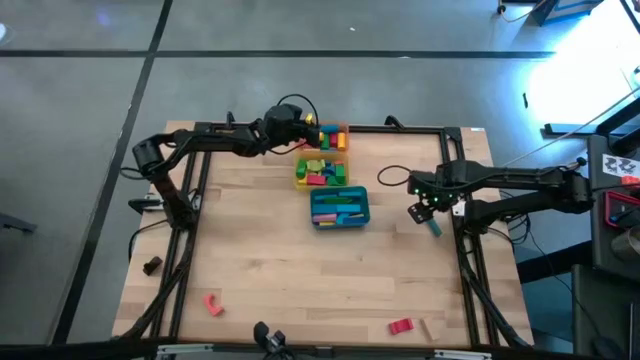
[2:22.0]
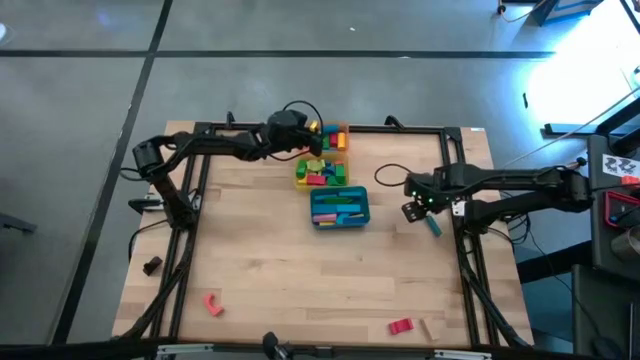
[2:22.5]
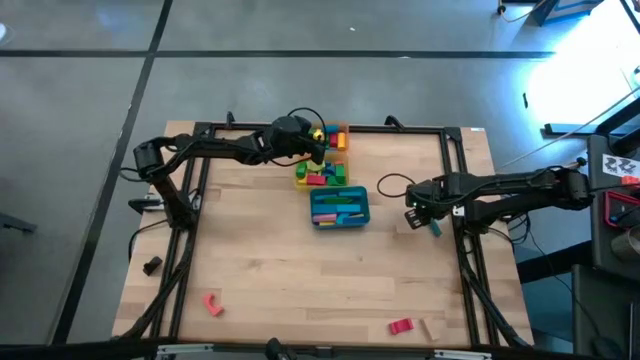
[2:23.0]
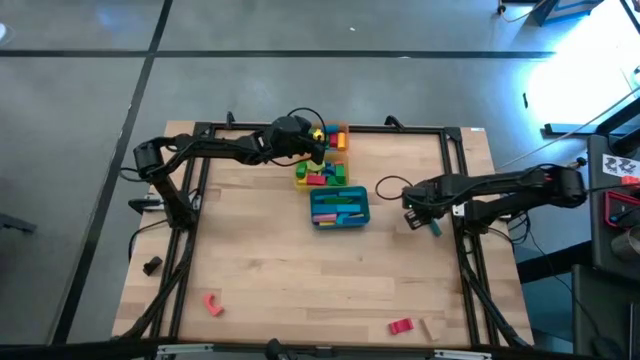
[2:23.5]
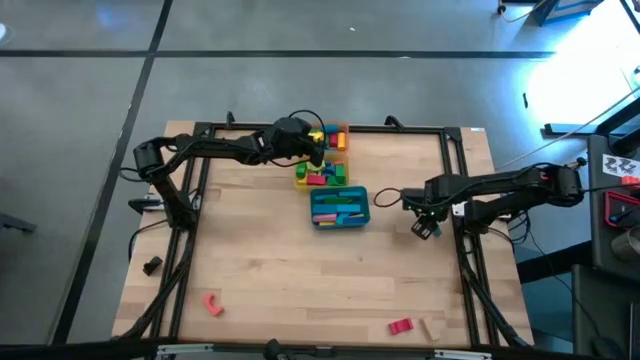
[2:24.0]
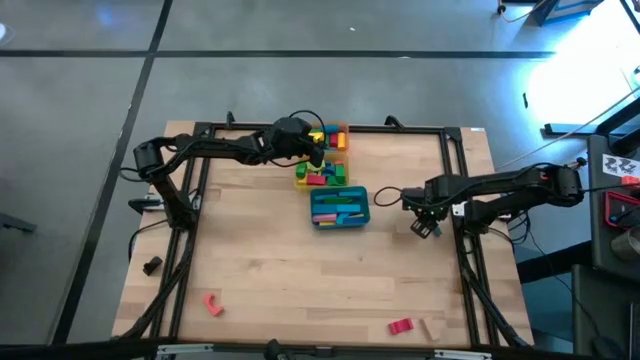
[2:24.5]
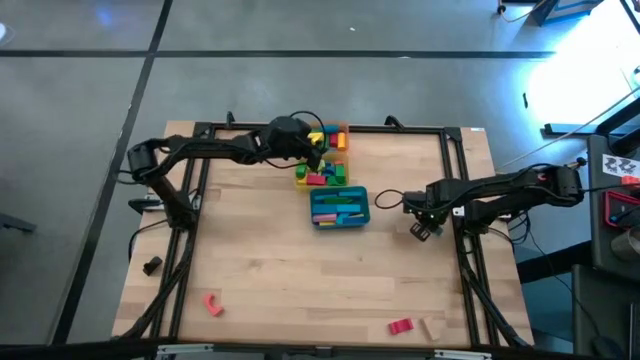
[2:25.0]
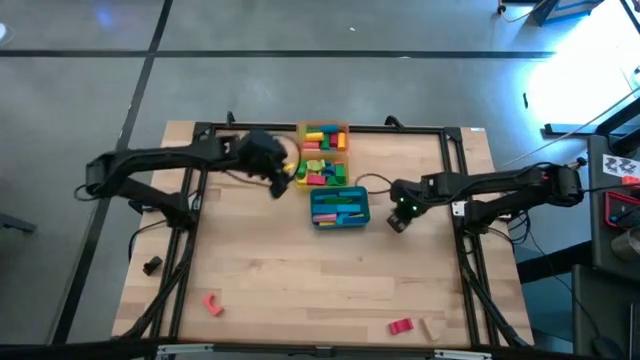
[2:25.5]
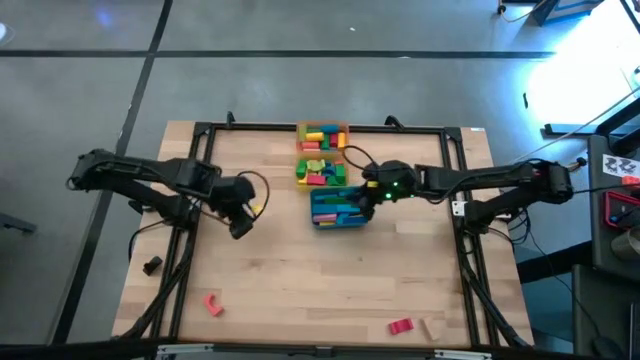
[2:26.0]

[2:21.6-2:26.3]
Task: Sort blocks by size
Put the blue rectangular block into the blue bin

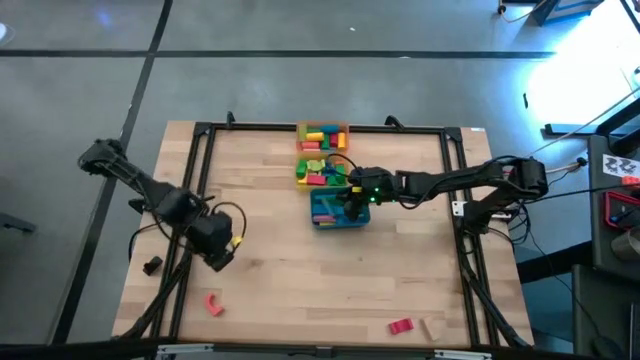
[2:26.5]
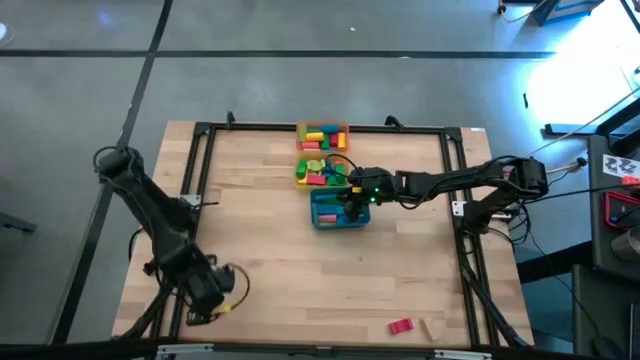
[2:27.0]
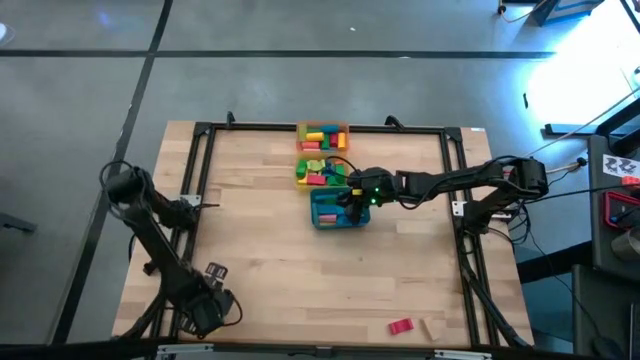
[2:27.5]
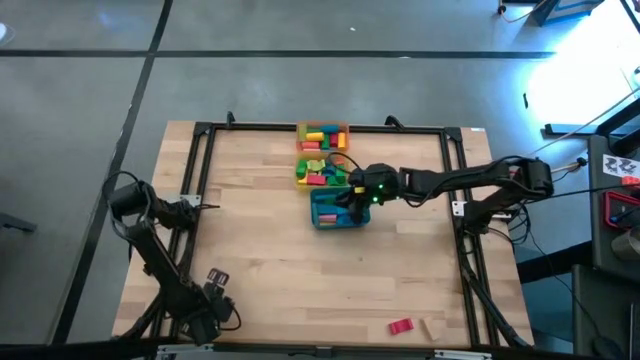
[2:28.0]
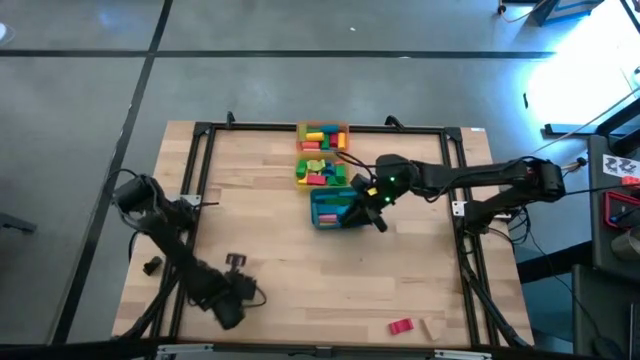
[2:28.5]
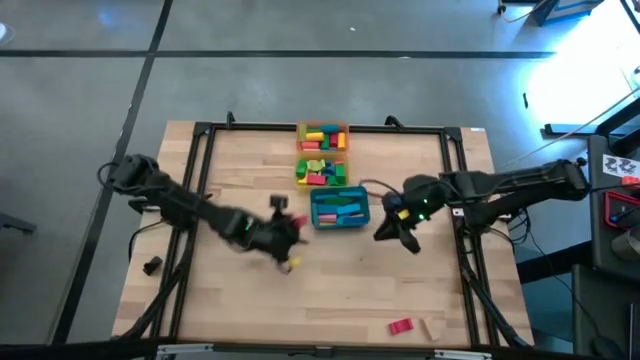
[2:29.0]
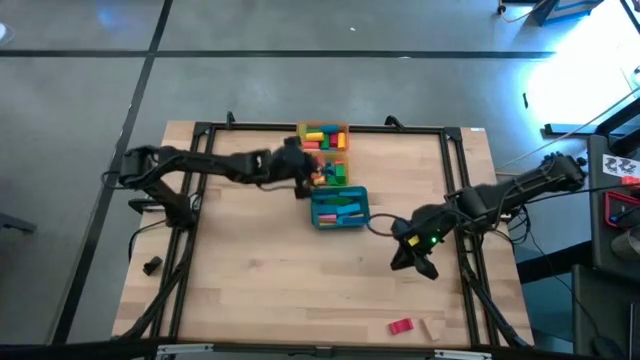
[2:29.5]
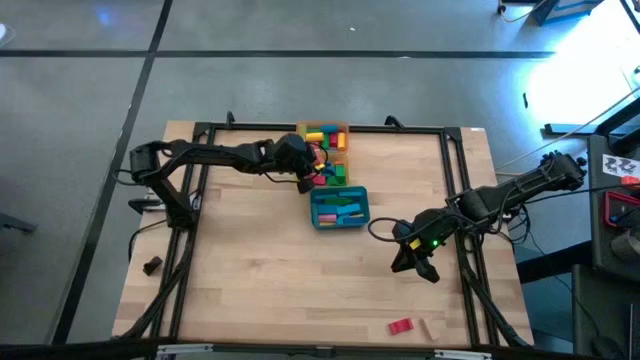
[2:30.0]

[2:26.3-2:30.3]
Put the orange arch block into the yellow bin

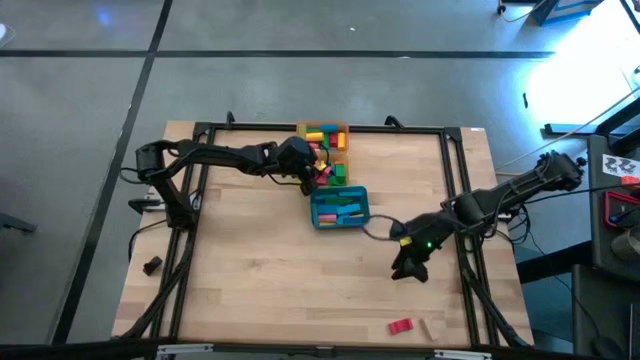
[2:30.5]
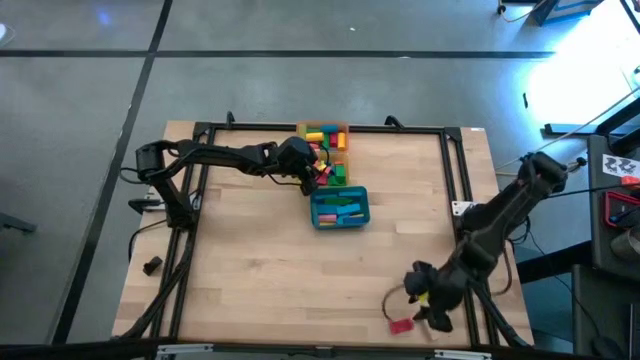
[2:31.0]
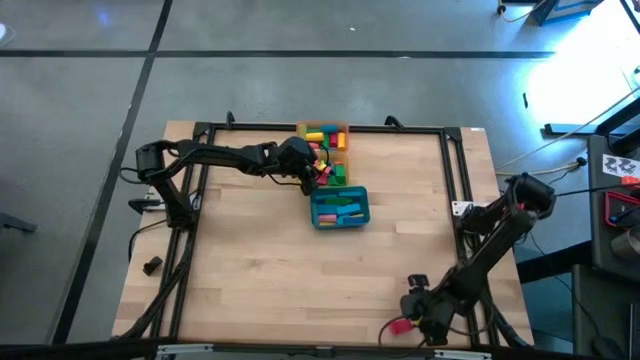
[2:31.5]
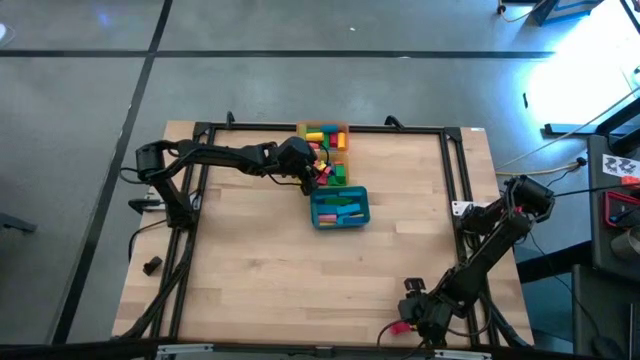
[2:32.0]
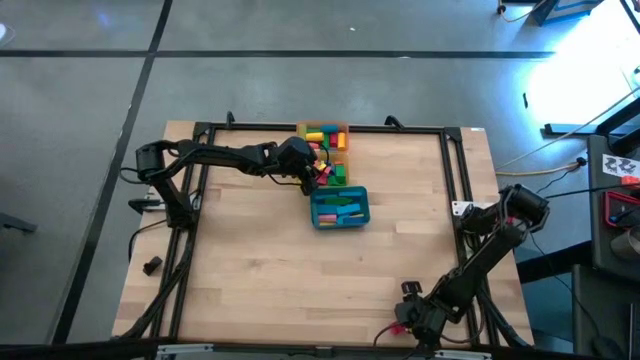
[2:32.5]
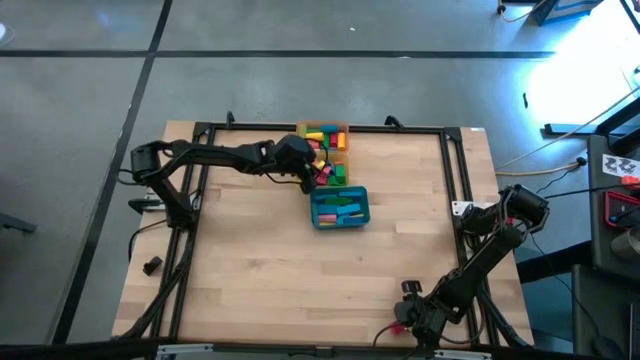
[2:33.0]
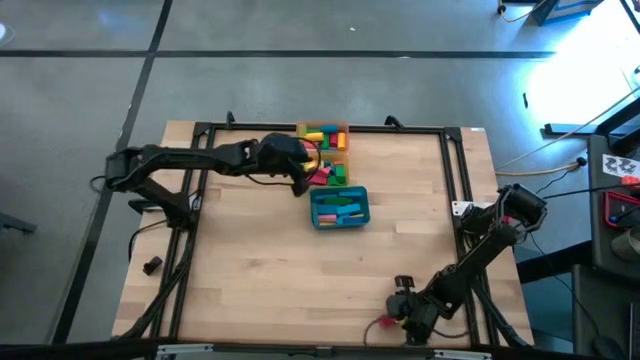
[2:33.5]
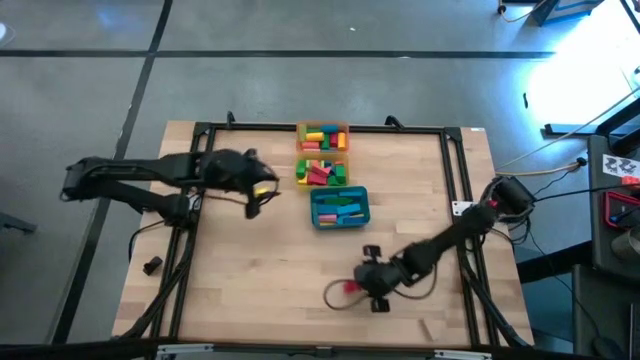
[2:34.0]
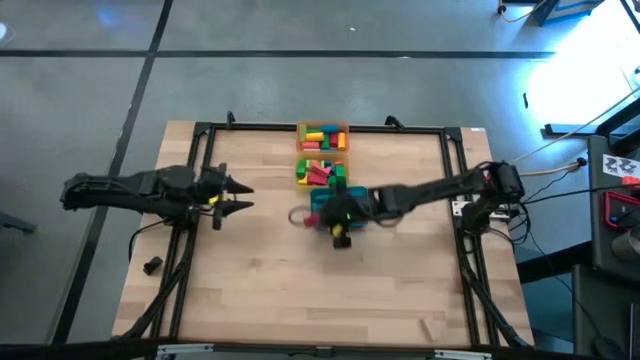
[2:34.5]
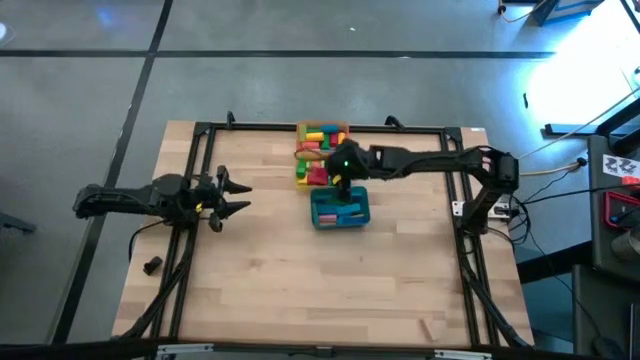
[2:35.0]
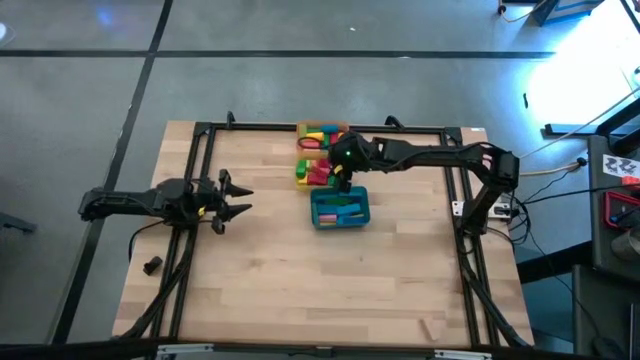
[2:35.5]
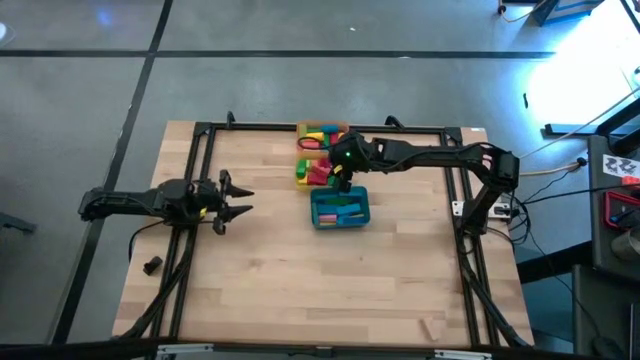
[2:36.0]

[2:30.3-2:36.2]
Put the red arch block into the yellow bin

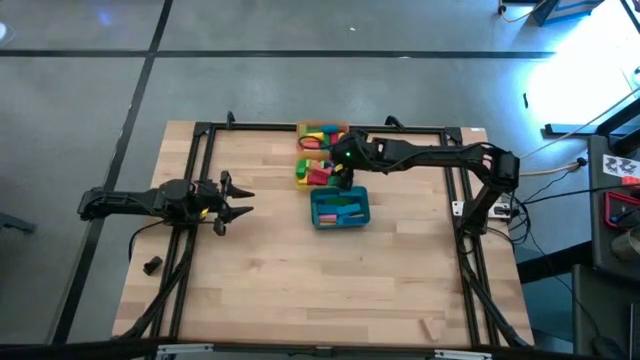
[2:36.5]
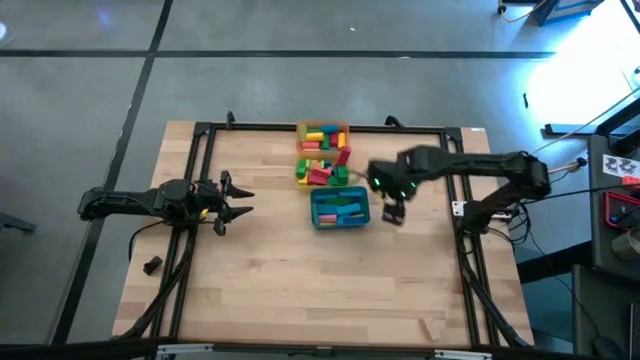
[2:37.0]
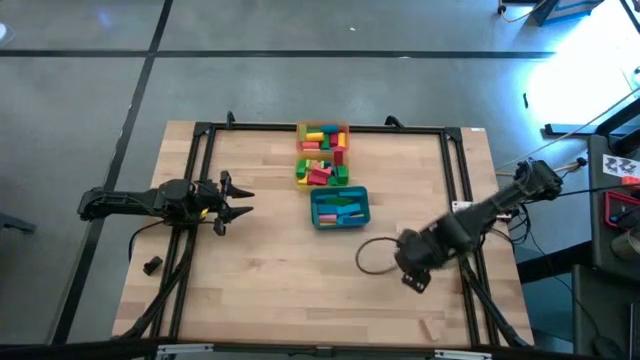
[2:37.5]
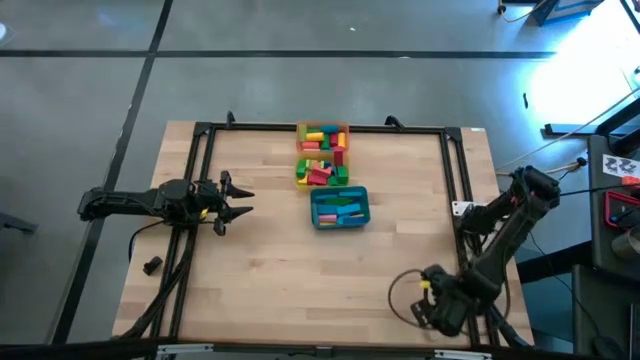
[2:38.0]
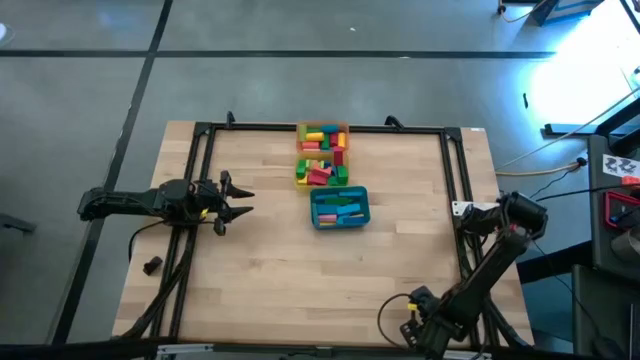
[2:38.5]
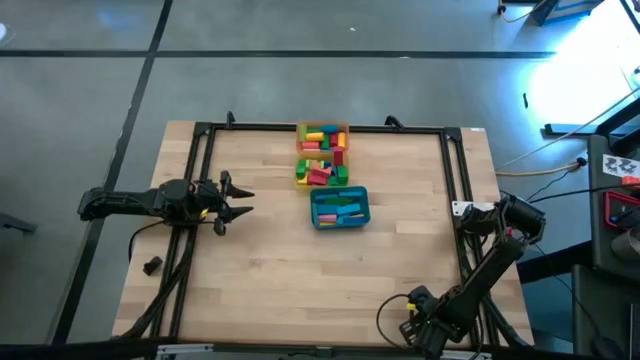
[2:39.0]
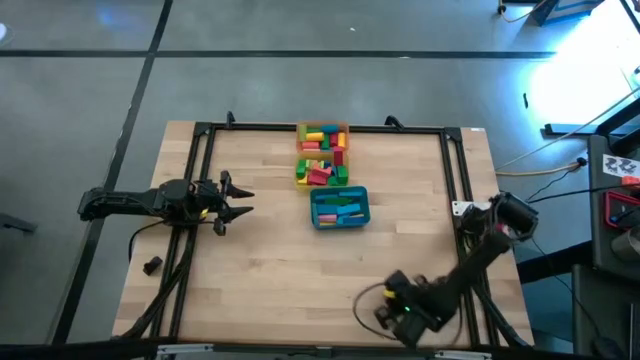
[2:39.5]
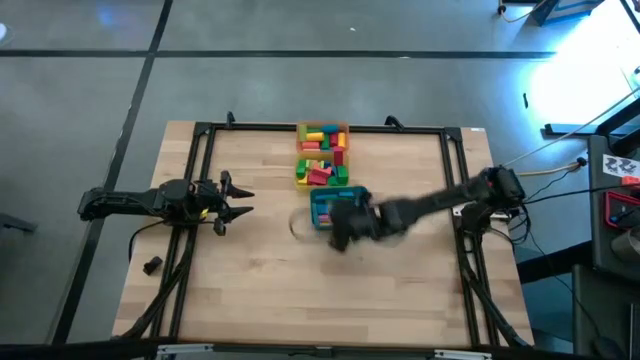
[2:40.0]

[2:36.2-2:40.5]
Put the brown arch block into the yellow bin

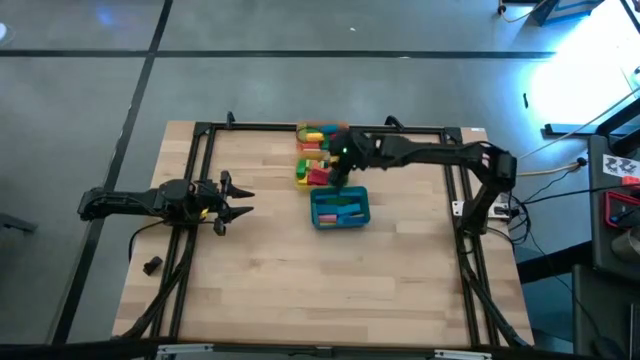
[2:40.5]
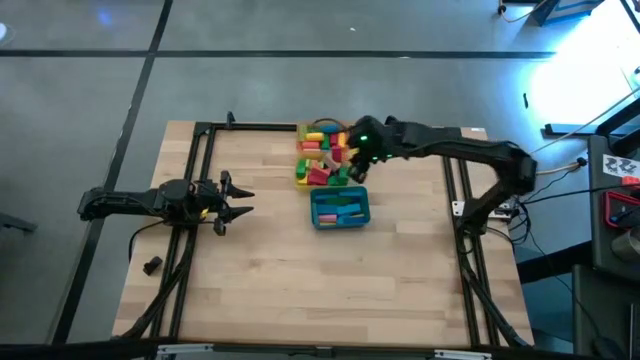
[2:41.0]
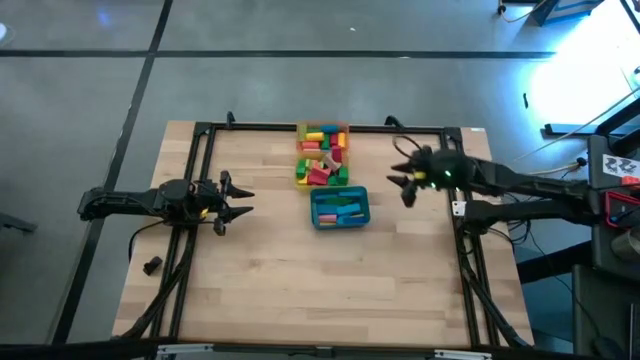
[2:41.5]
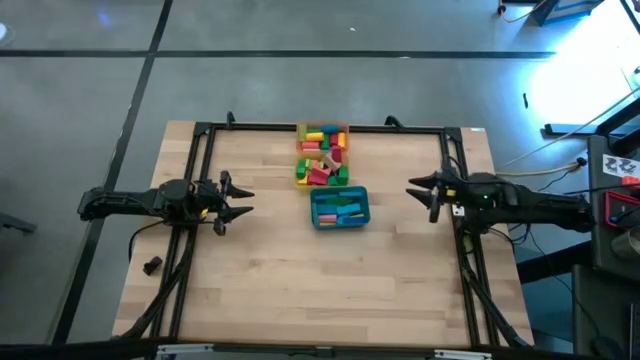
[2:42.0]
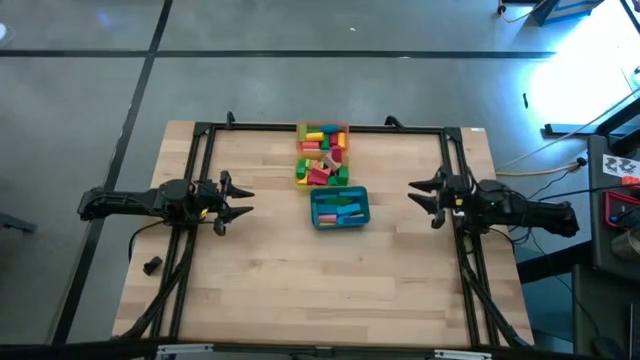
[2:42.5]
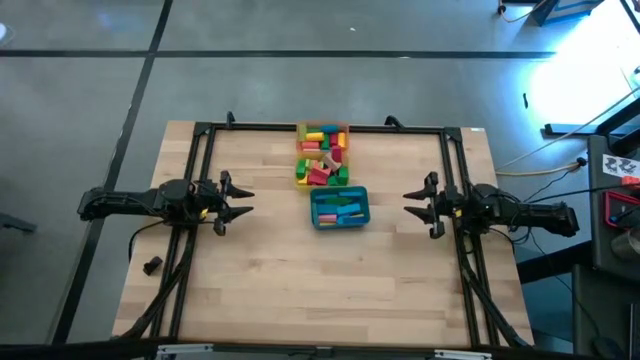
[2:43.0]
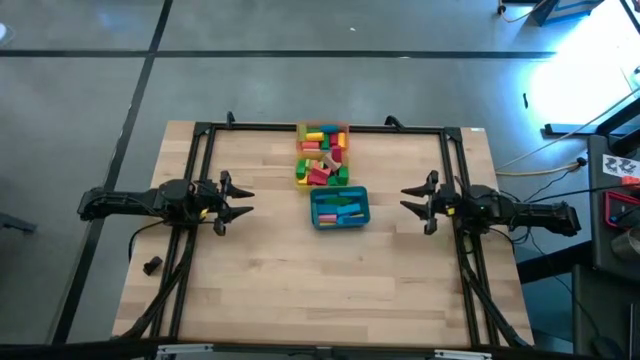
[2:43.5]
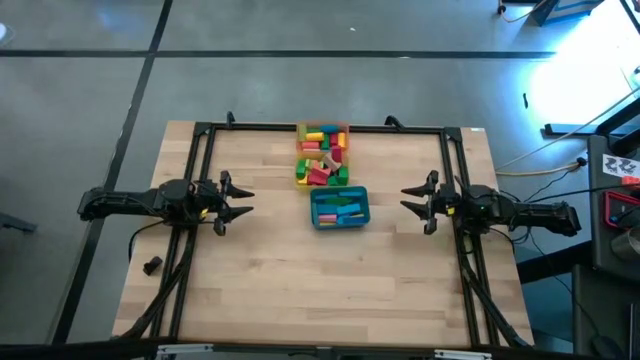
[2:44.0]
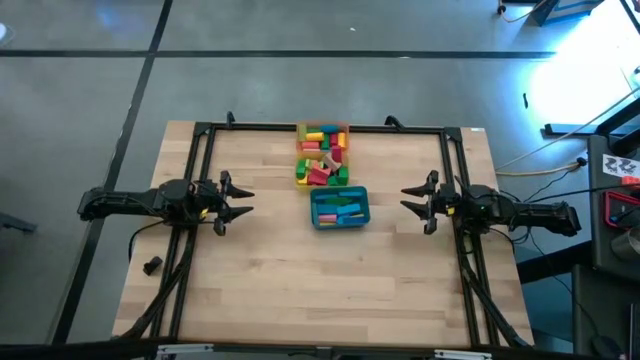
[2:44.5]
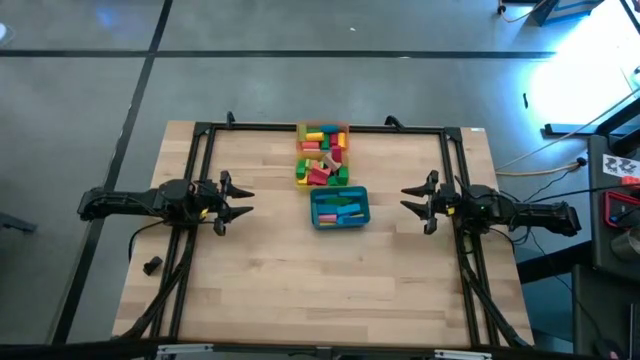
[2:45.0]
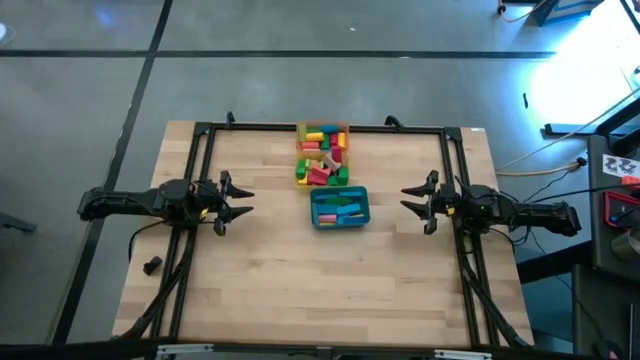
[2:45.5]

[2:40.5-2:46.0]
Return to Home Position
